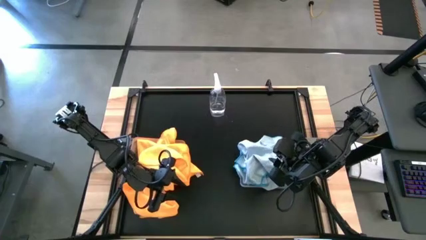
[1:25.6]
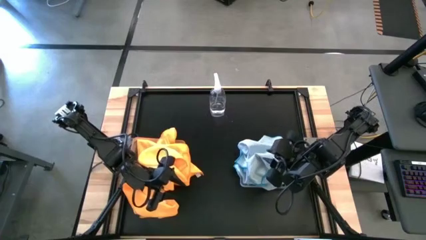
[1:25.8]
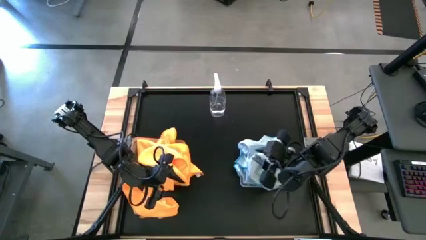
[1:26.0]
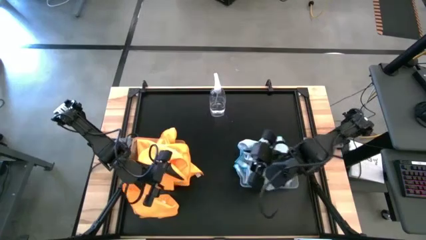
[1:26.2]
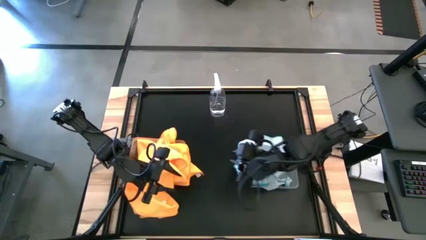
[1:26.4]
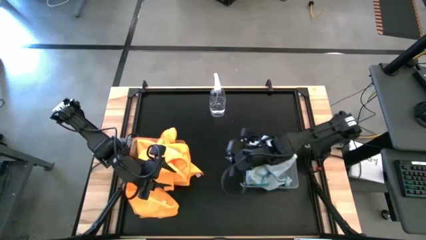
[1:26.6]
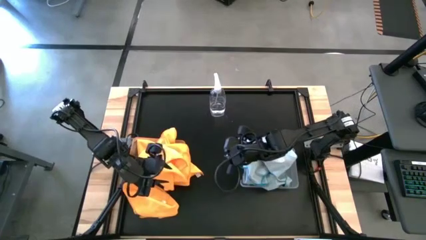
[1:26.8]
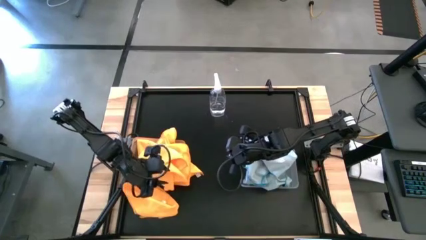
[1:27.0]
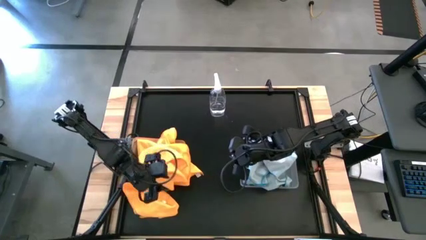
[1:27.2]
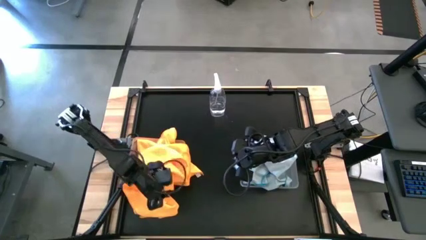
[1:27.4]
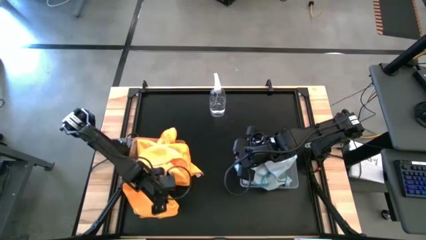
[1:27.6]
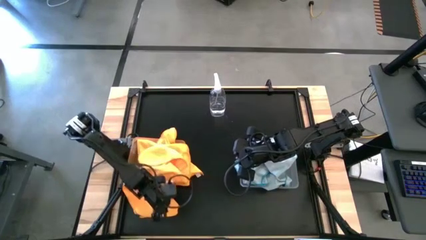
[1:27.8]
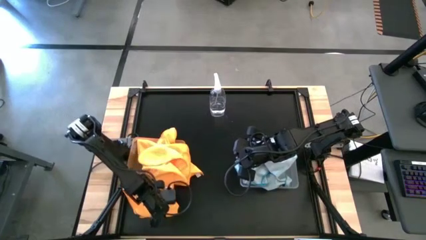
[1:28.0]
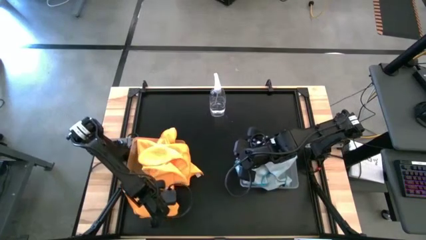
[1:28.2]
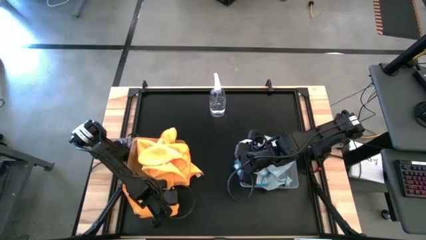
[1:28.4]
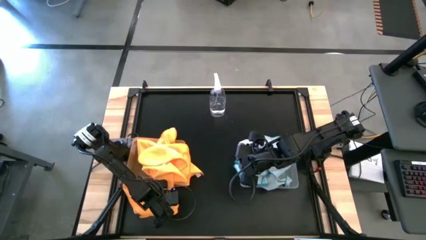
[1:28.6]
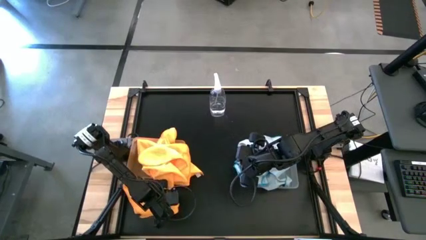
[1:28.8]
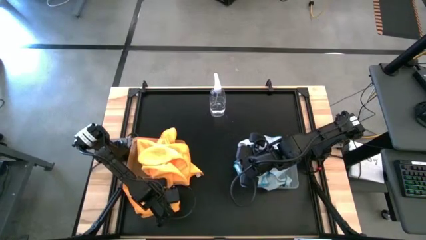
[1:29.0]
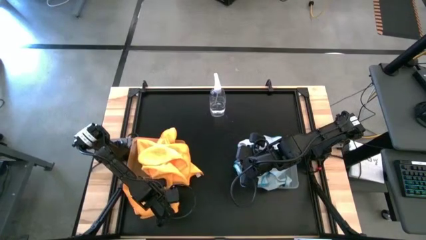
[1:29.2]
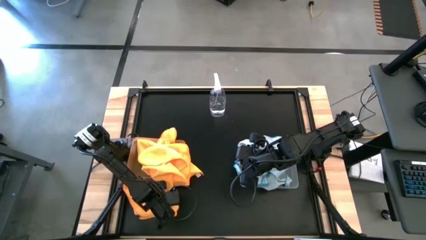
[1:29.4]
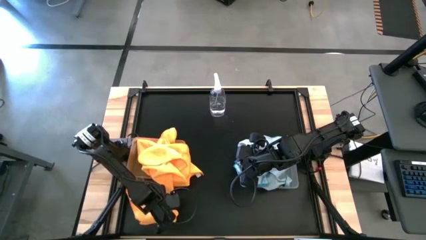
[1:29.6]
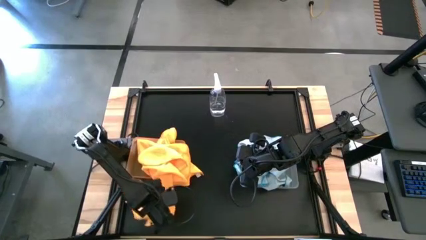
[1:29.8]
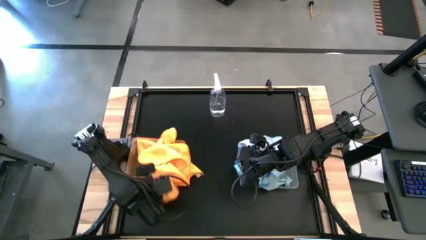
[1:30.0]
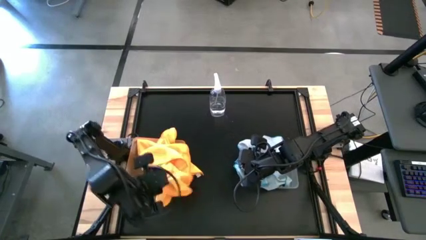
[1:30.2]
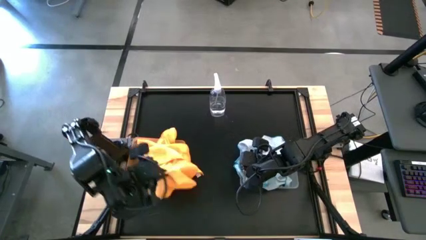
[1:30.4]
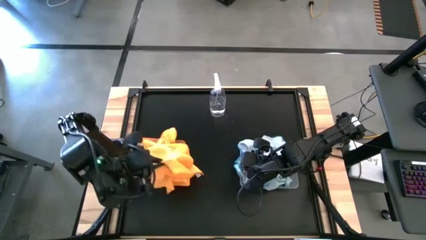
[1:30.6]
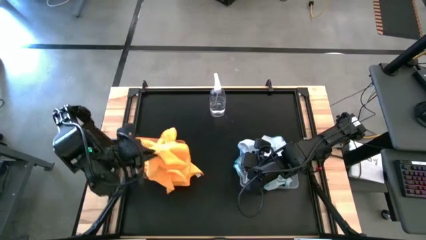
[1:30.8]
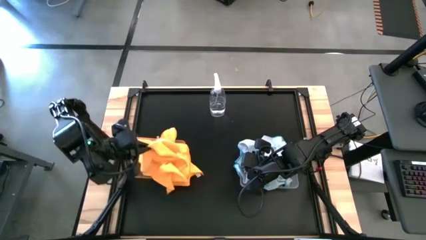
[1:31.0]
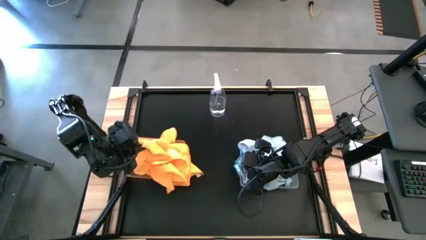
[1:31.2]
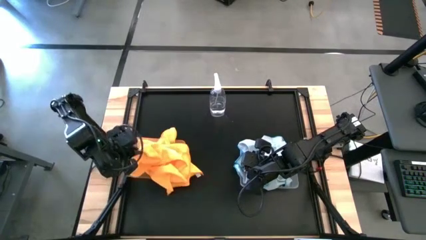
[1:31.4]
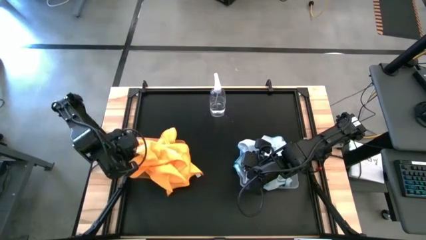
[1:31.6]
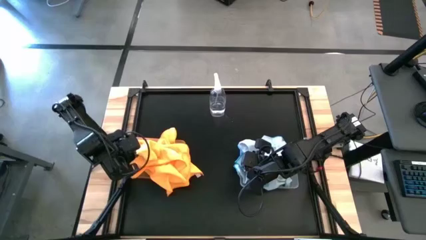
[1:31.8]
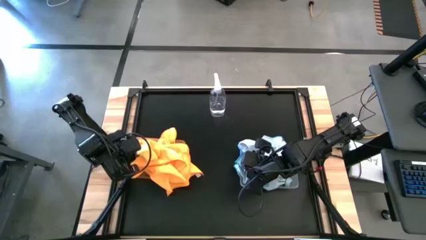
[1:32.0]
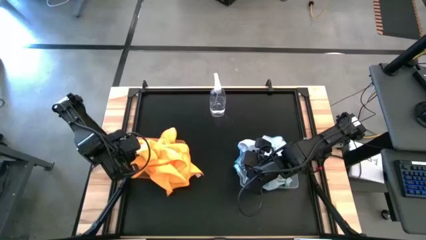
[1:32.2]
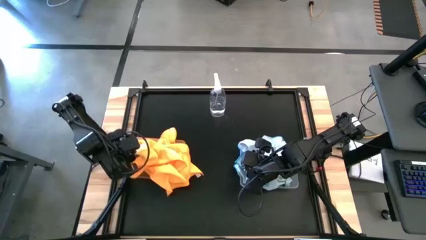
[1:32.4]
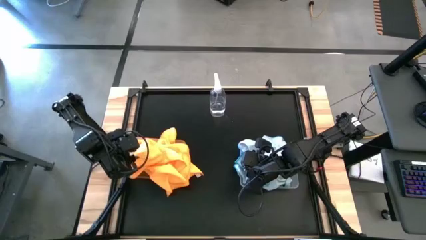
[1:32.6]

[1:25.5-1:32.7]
Task: Sort microfiber towel by color & place in baskets
Put the orange microfiber cloth into the orange bin

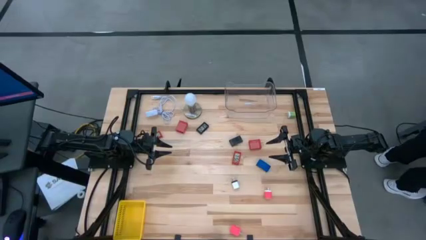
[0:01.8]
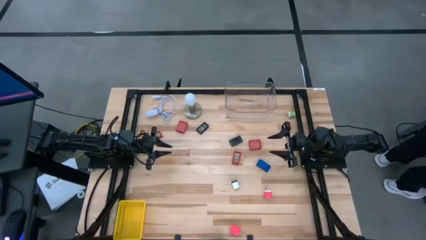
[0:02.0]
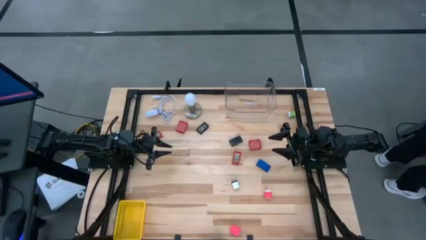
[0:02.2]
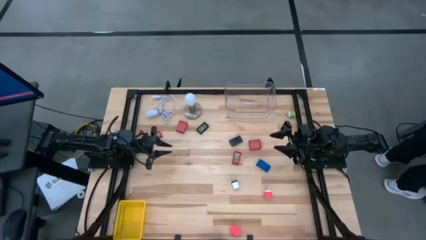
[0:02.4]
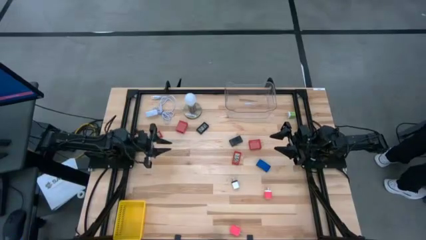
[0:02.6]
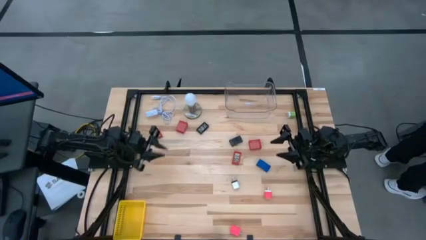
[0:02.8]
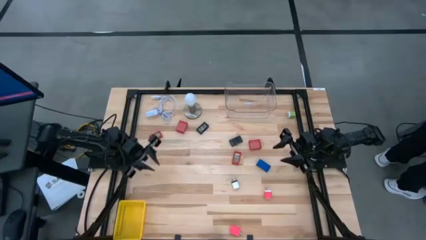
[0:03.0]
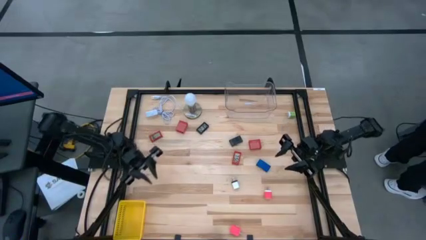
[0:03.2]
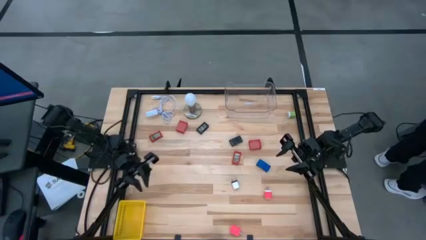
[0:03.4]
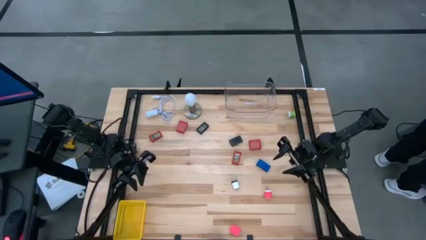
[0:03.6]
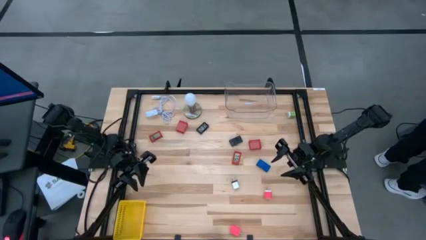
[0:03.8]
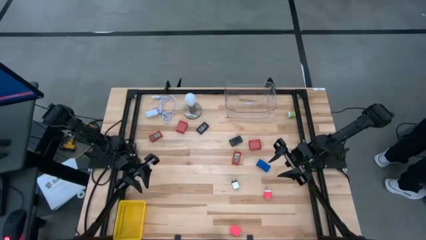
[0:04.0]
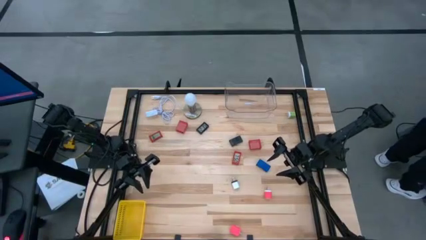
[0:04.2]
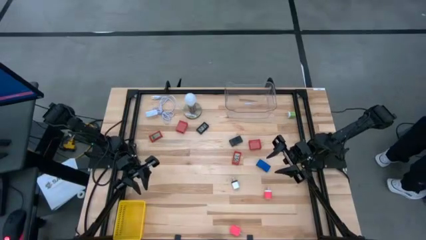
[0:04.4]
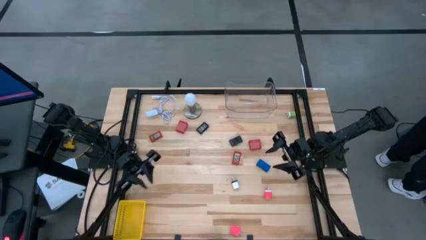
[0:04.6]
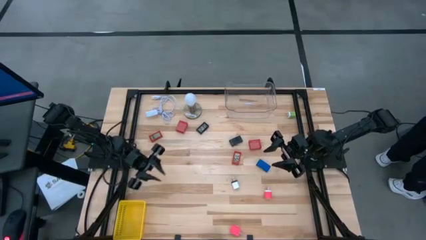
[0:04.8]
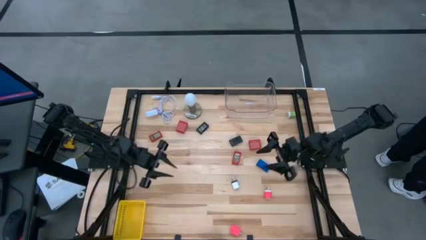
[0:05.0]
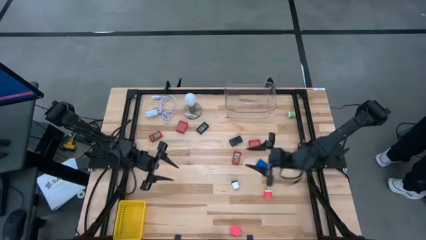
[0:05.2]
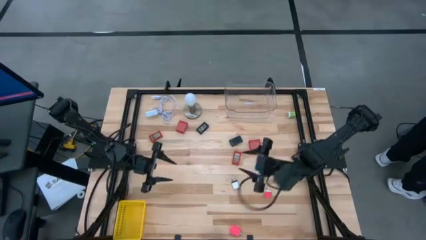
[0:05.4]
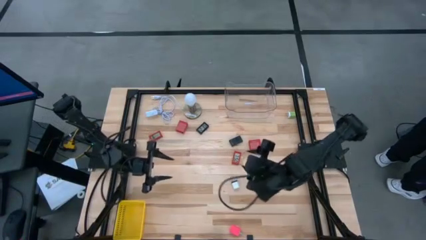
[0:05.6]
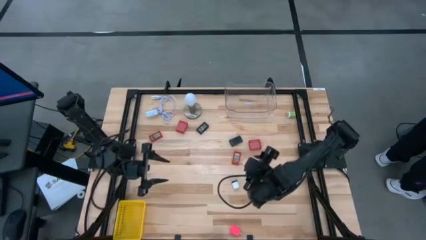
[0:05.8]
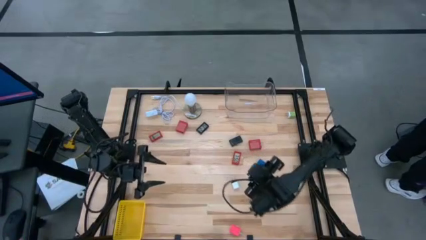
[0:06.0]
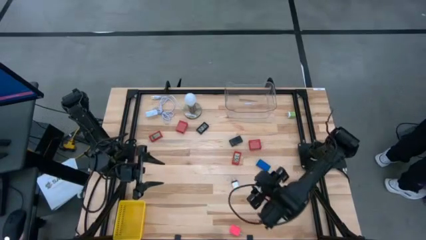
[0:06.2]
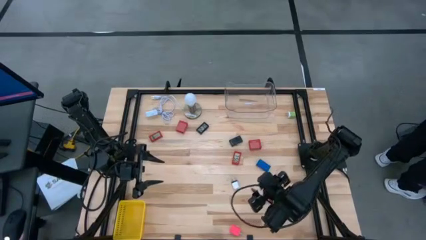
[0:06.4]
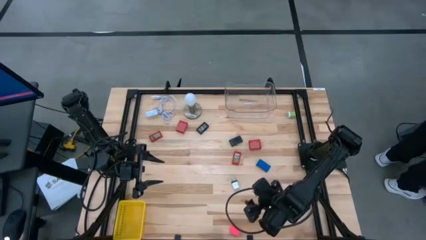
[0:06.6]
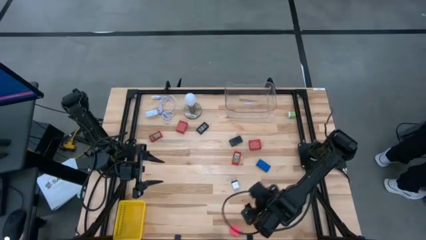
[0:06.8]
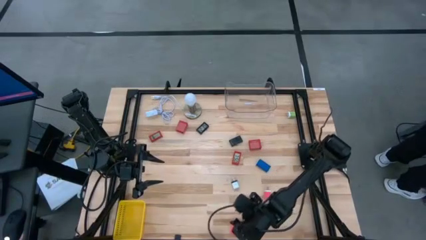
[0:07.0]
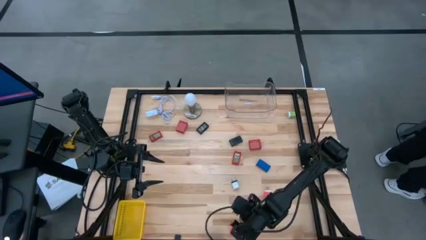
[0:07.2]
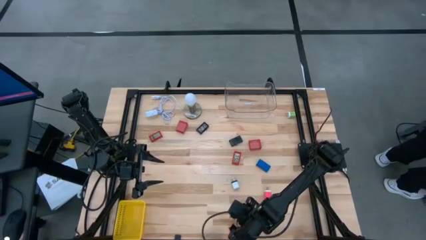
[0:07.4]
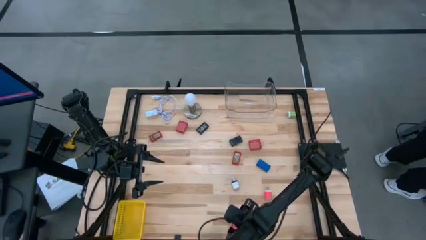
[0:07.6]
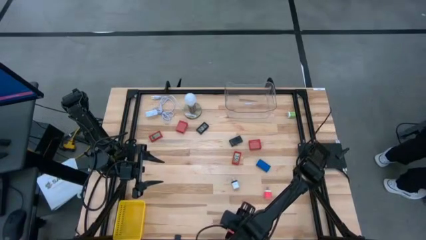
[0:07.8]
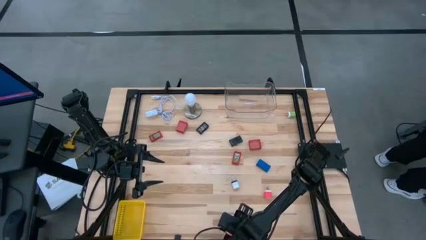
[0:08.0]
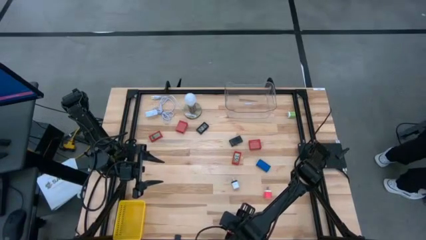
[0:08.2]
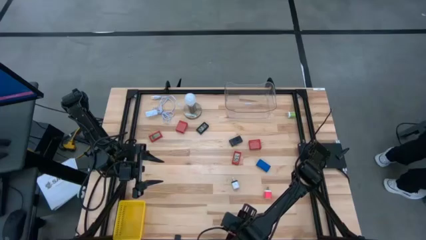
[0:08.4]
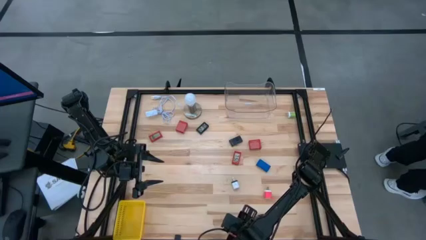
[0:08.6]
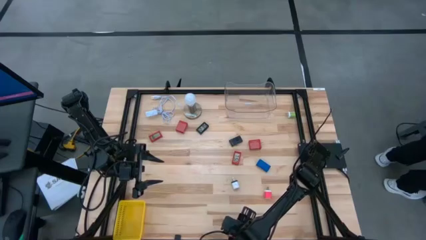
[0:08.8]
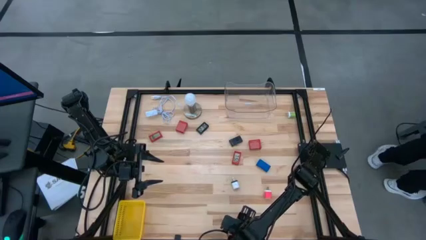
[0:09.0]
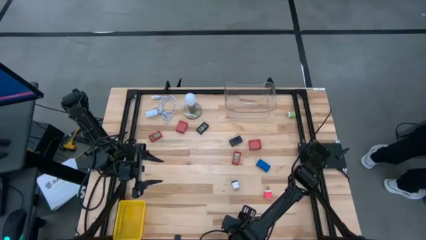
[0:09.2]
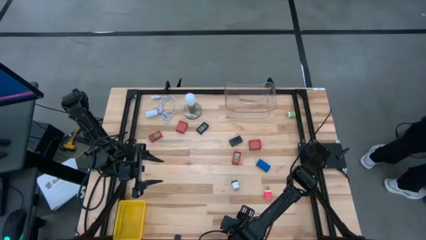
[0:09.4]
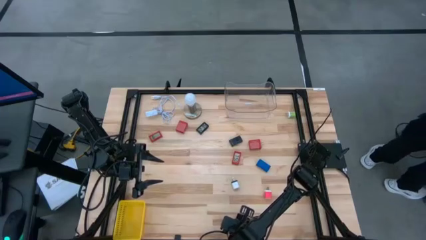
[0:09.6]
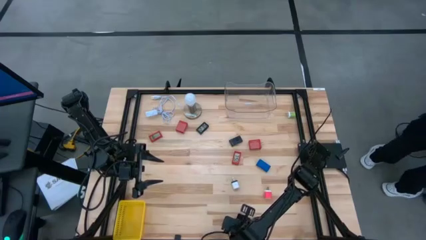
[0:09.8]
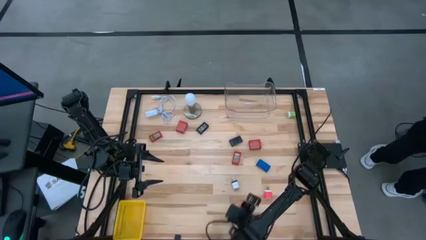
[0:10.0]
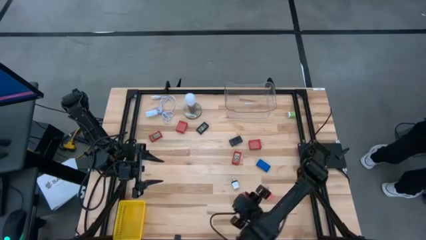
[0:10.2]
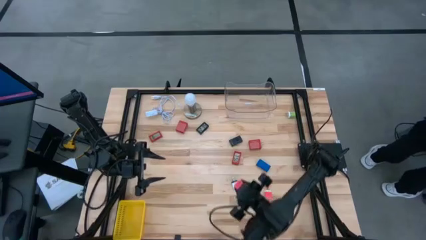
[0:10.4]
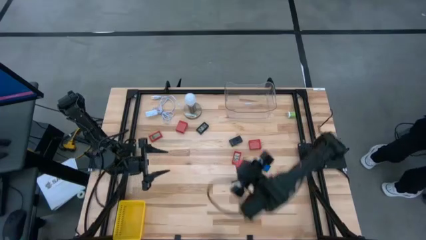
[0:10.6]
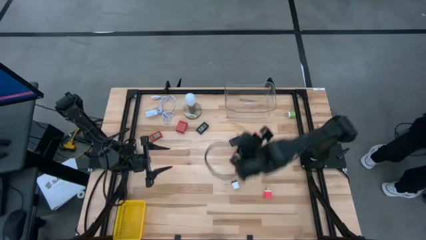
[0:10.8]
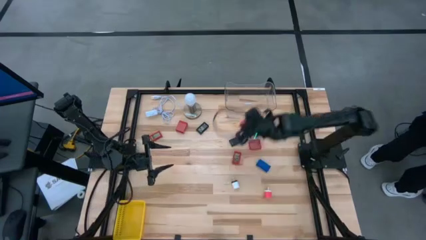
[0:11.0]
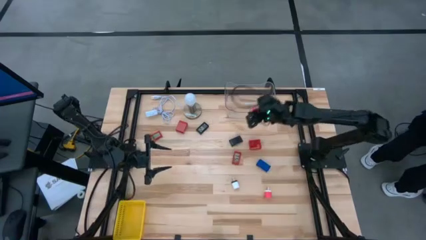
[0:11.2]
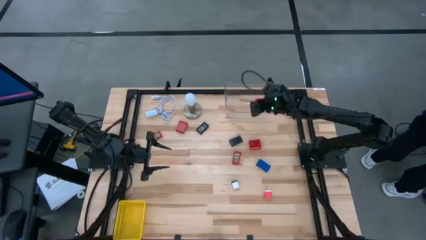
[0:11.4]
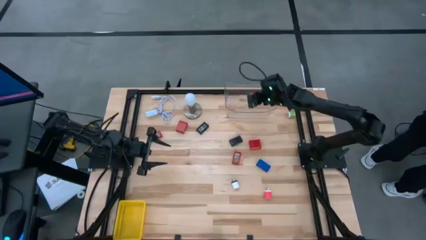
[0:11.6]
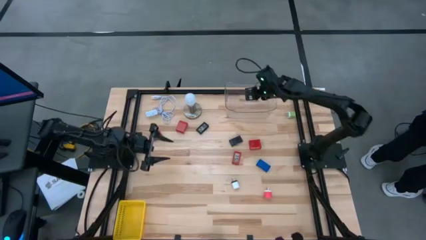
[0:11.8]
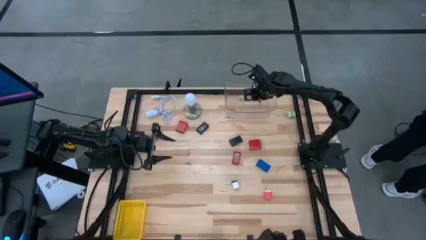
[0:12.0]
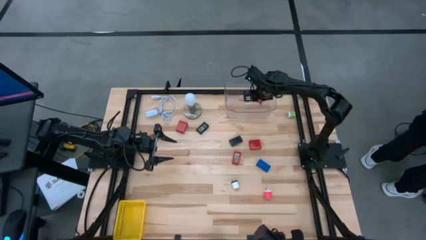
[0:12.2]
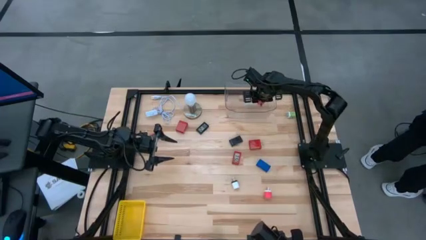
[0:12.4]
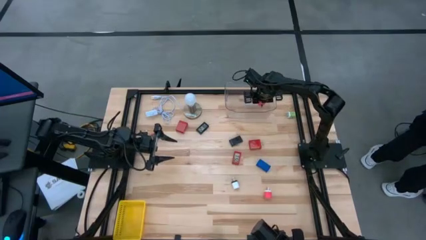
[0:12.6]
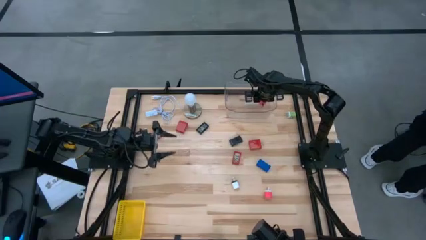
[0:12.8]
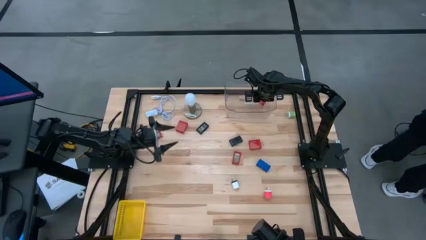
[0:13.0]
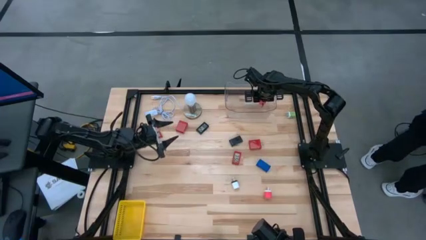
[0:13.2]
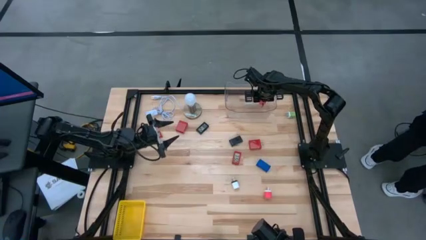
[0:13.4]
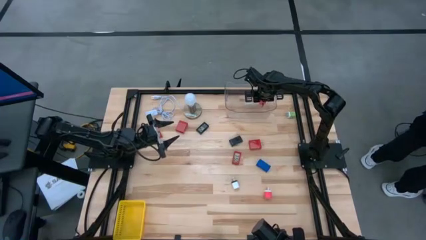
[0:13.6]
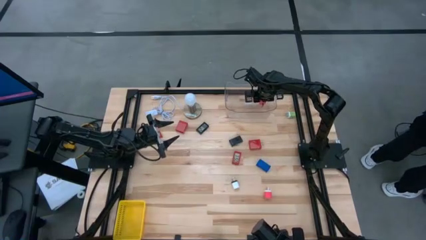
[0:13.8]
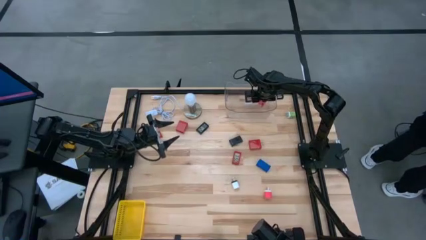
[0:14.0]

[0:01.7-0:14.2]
Task: Pick & Place Office items
Put the pink charger adapter into the transparent bin
